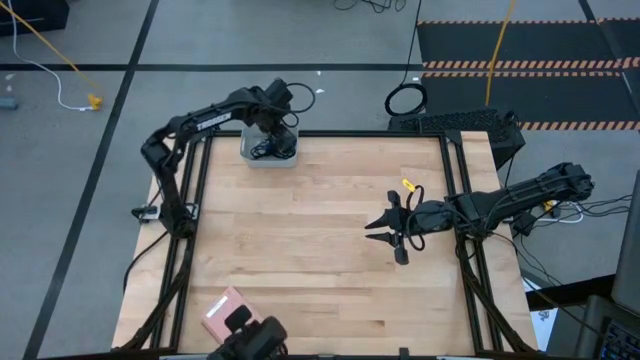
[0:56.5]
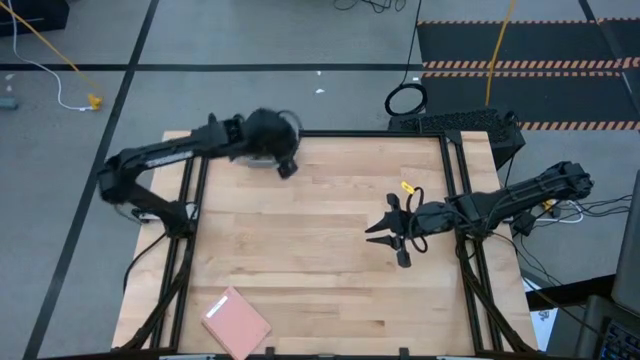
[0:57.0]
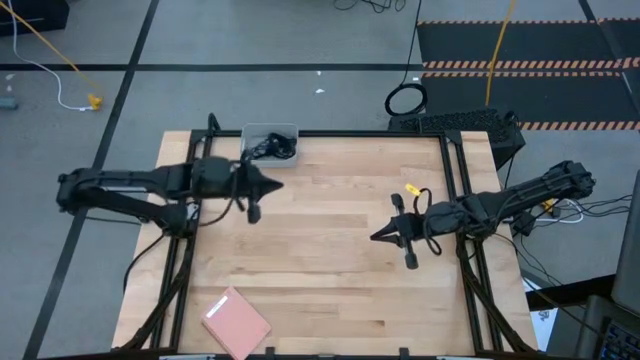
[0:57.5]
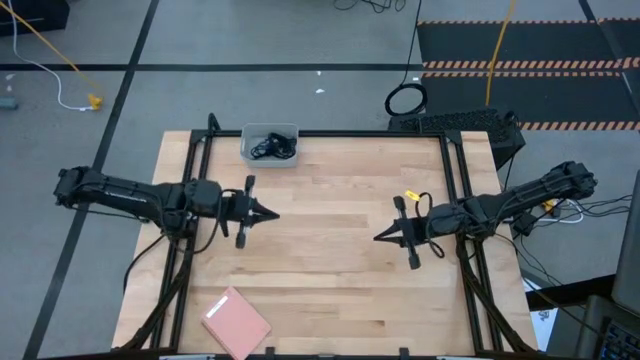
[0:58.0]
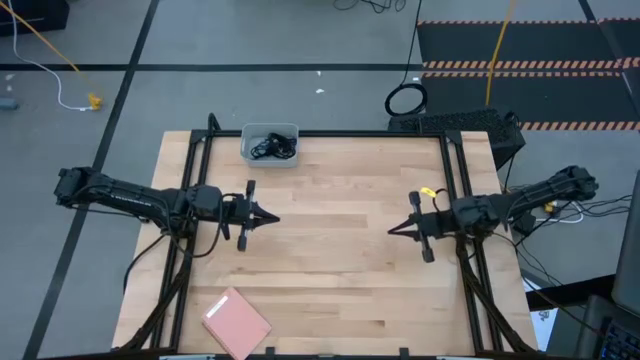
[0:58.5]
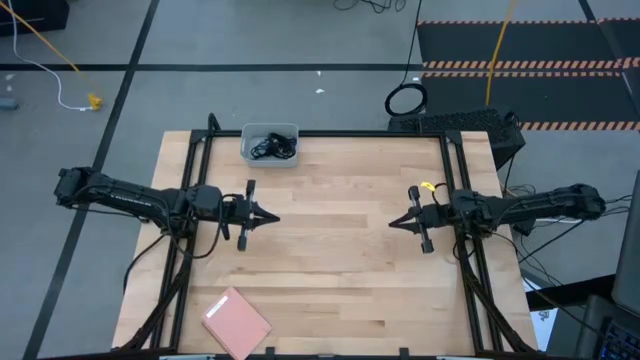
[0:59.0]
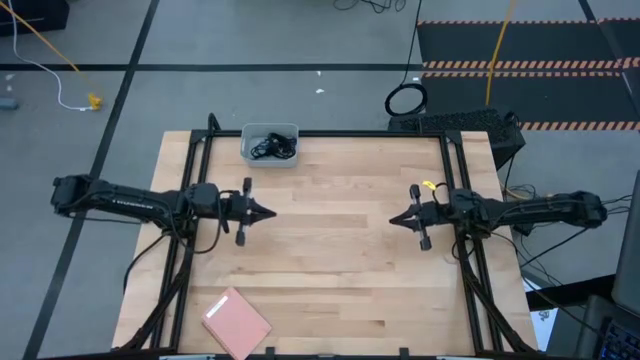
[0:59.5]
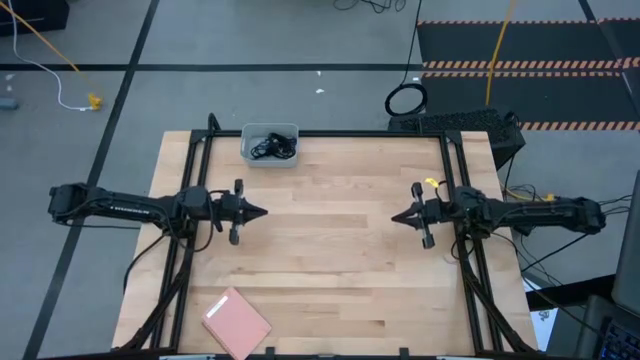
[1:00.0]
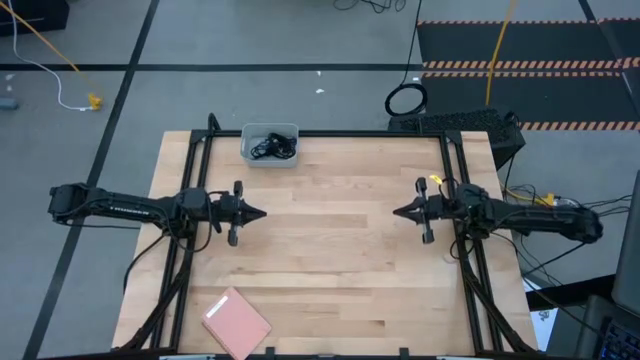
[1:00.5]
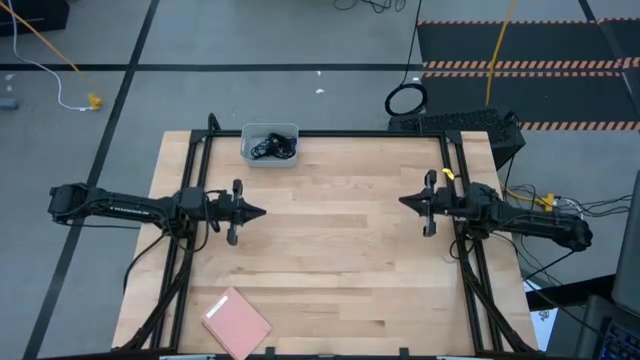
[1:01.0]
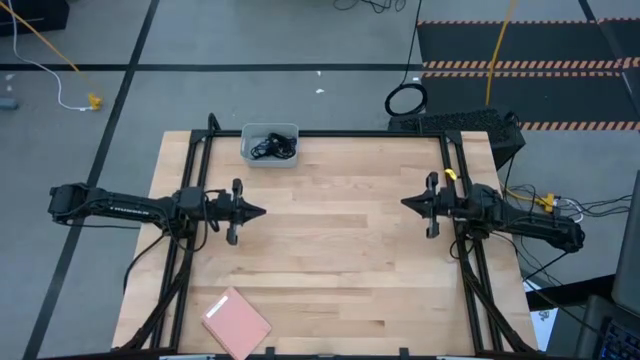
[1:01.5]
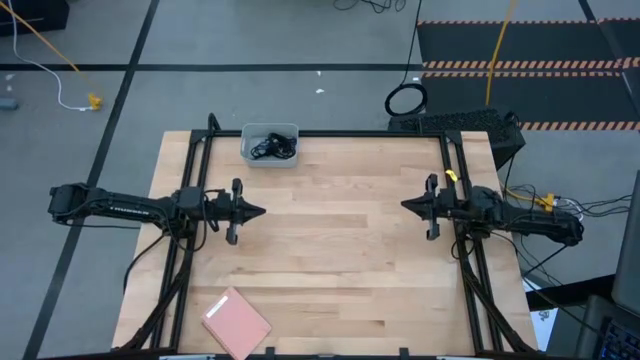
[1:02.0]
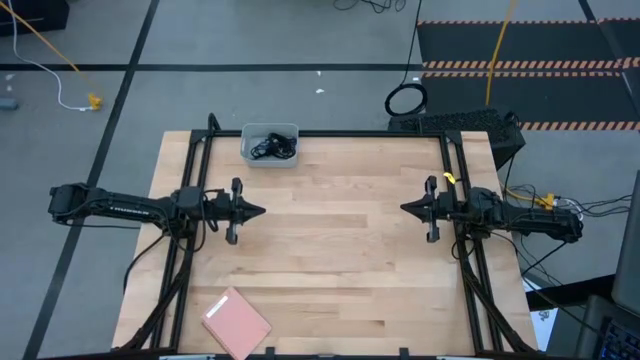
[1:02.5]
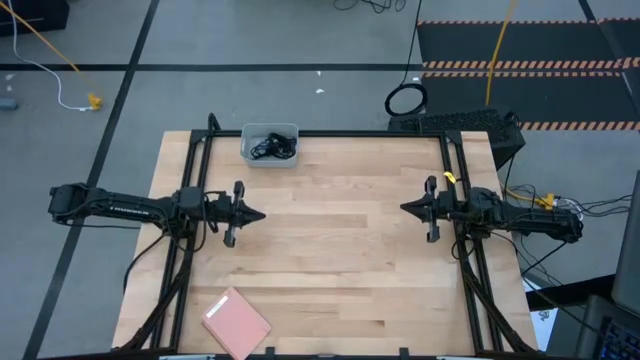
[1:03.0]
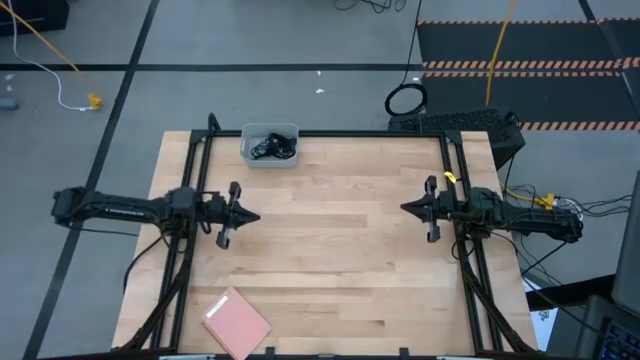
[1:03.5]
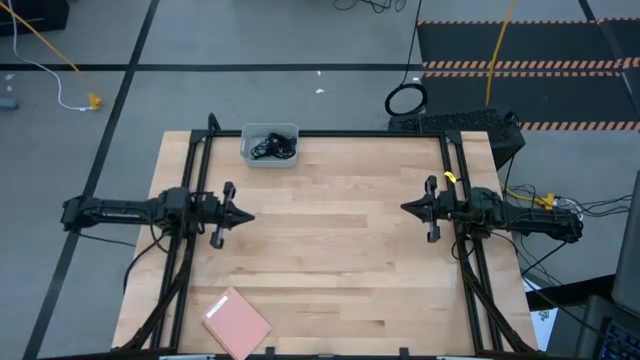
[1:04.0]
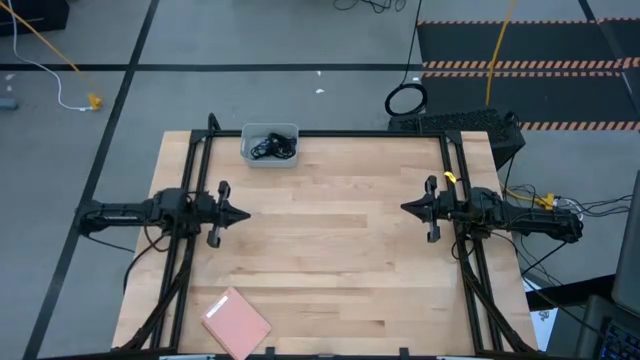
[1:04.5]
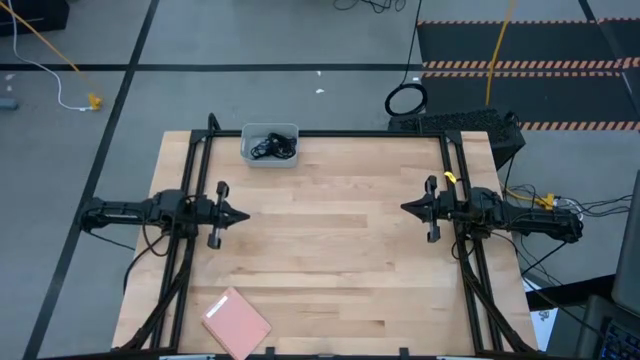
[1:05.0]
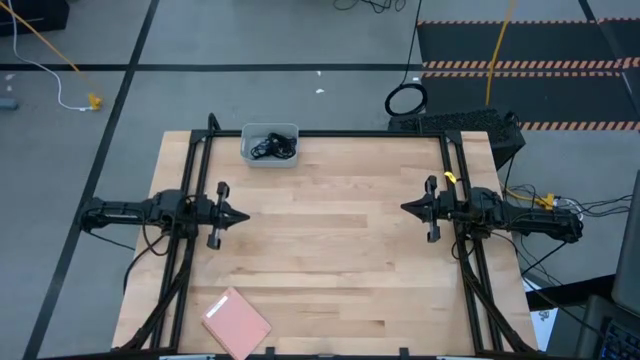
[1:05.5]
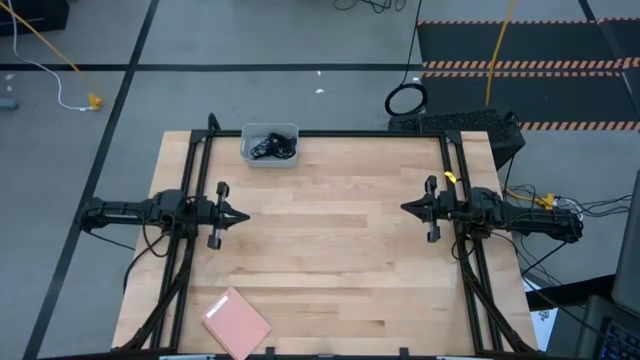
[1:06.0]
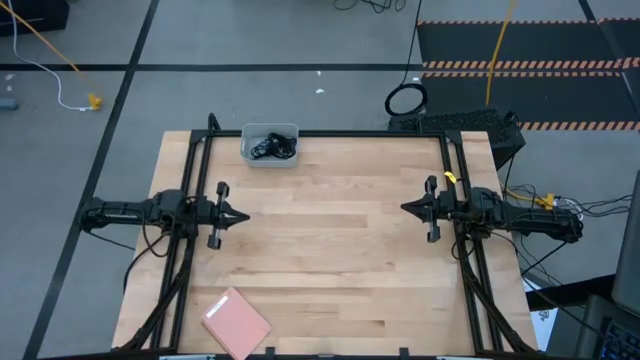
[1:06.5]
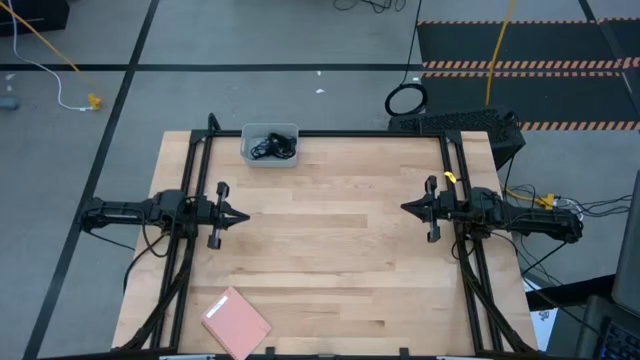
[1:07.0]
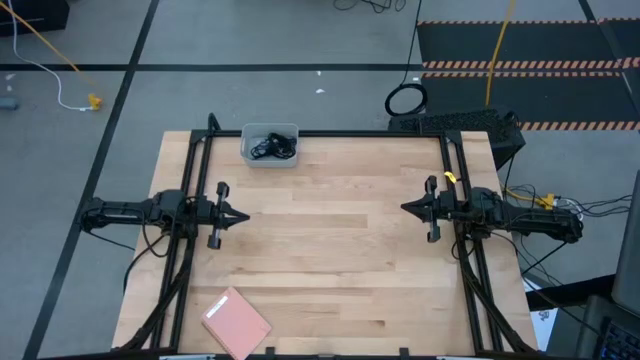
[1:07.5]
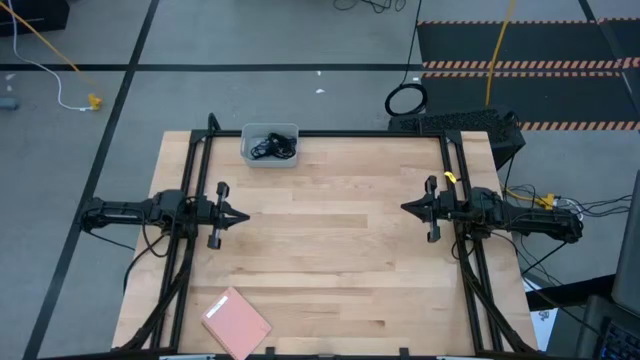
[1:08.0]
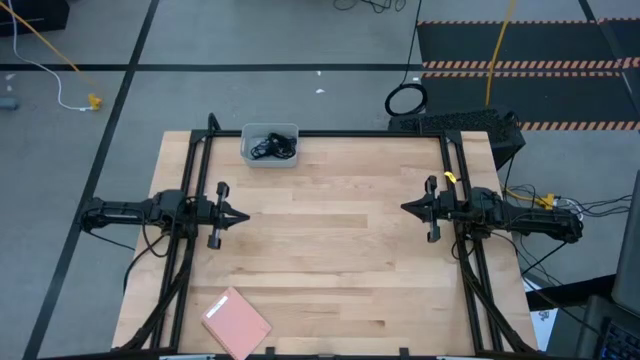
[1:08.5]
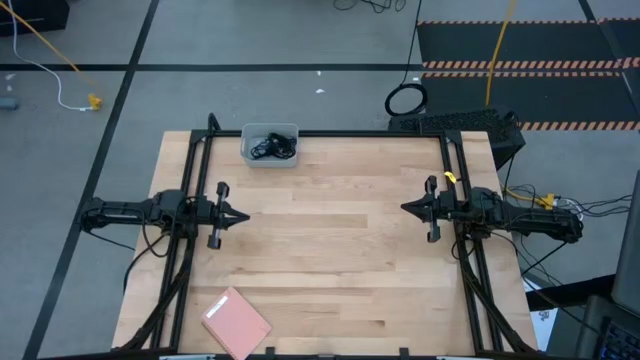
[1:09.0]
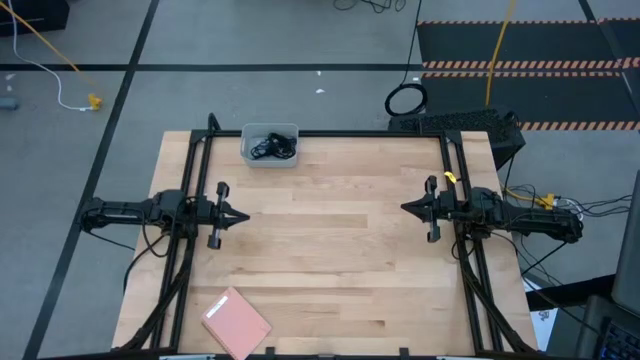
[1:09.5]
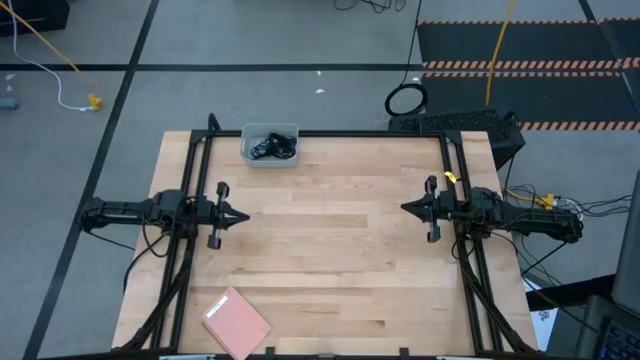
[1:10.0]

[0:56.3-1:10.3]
Task: Pick and place USB-C Cables
Return to Home Position
